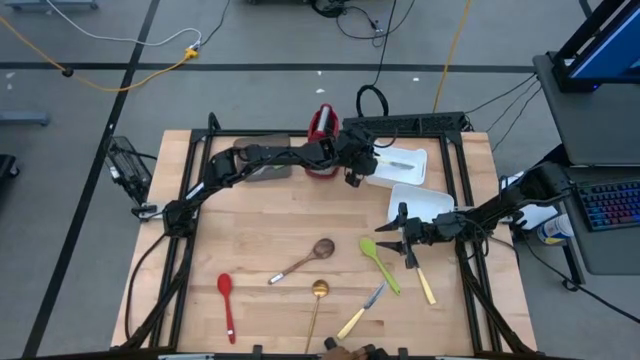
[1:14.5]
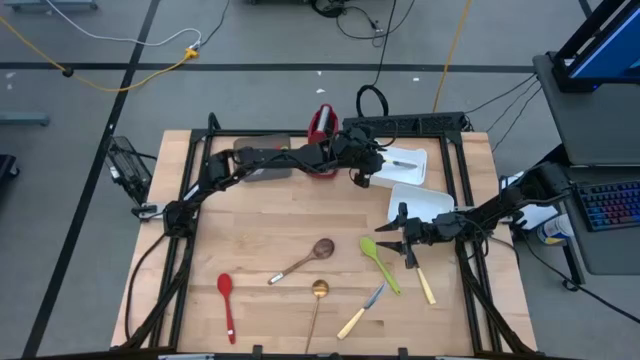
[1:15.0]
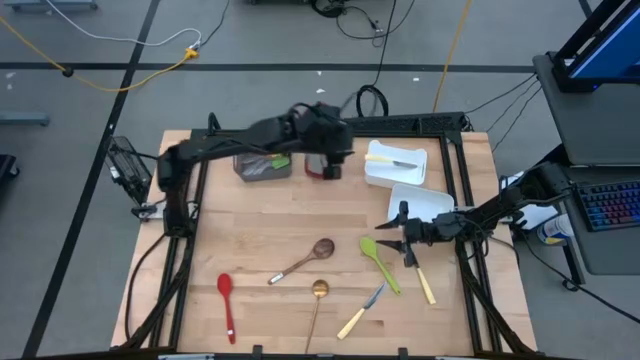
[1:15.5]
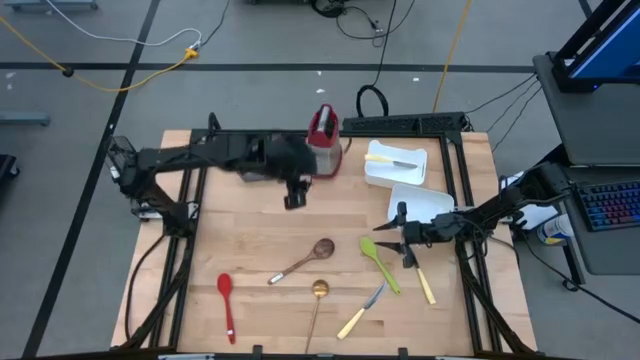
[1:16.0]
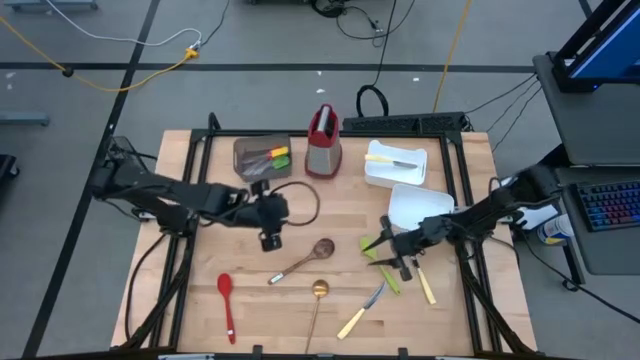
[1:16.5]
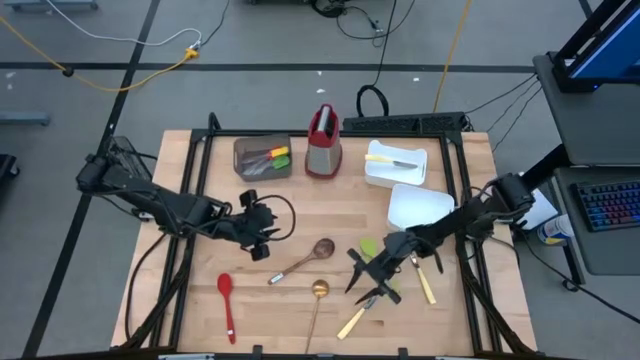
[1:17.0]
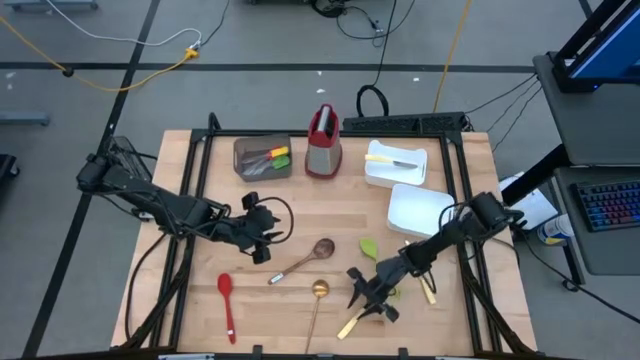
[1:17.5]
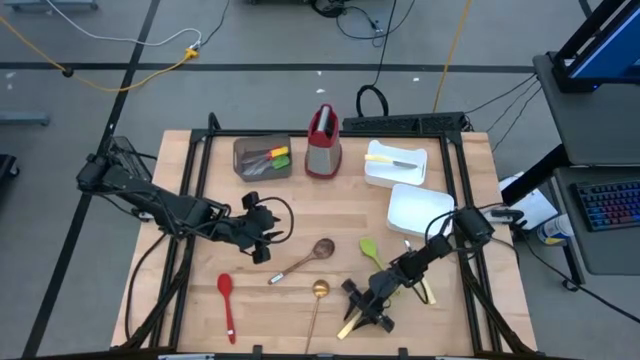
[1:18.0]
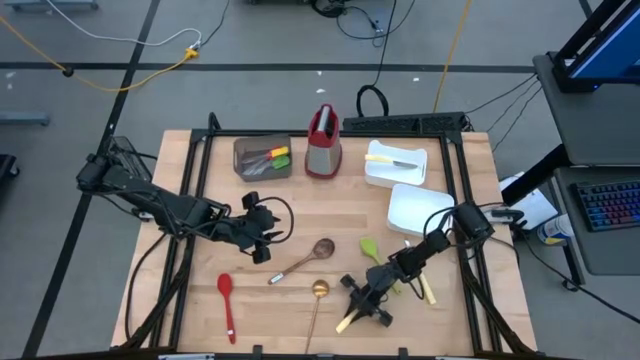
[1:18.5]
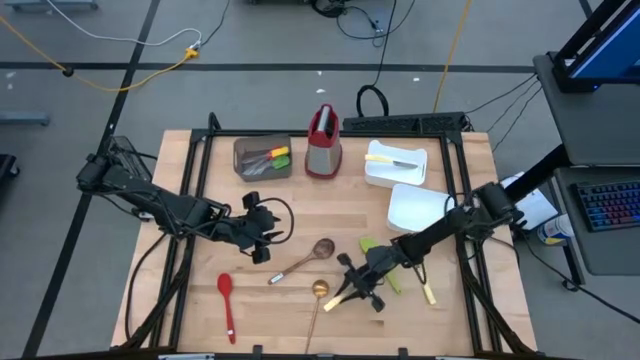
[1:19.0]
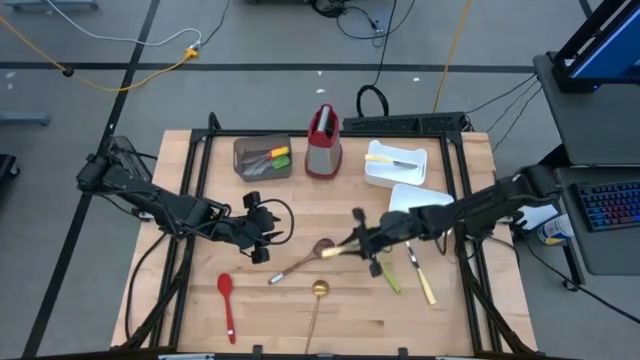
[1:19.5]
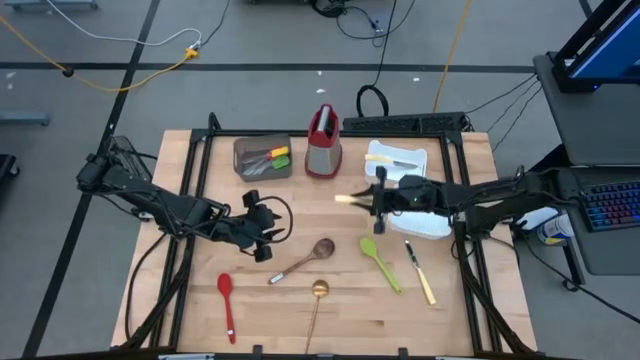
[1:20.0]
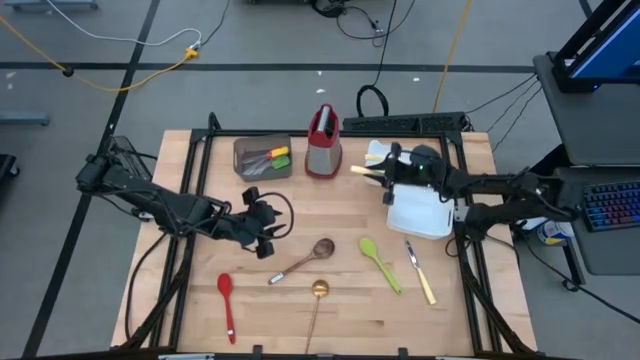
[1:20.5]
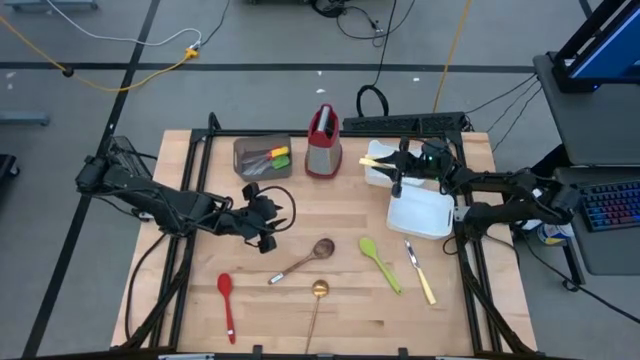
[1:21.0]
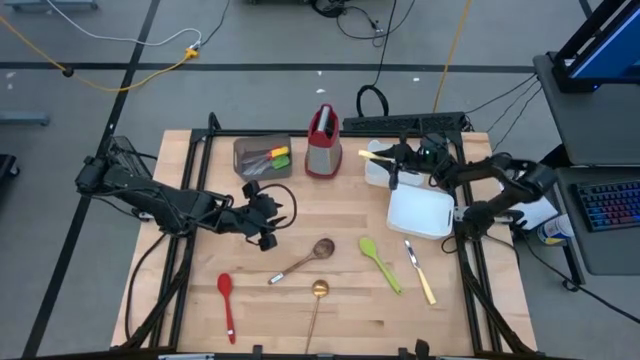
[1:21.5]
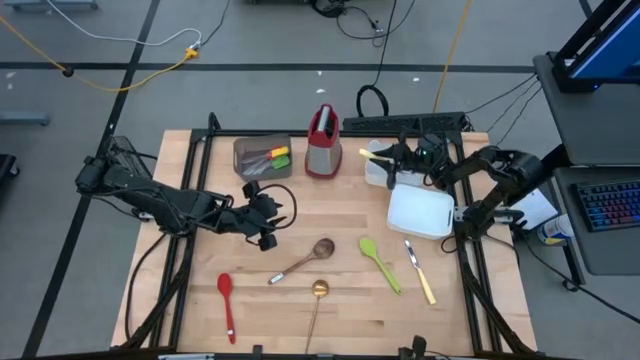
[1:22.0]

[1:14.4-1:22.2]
Task: Pick & Place Kitchen Items
Put the left yellow table knife into the top white bin

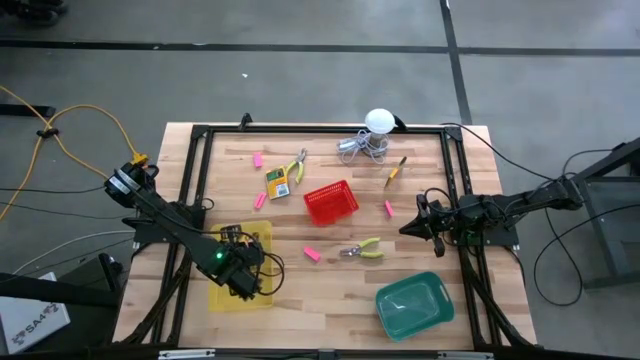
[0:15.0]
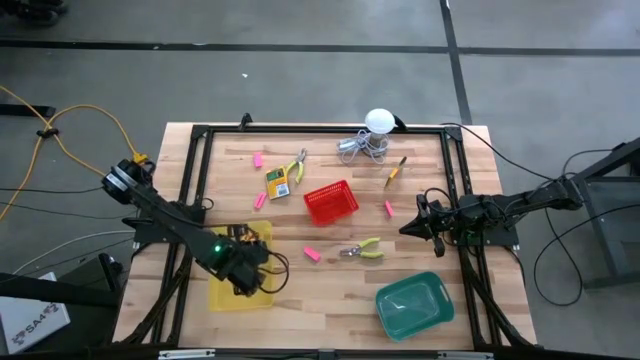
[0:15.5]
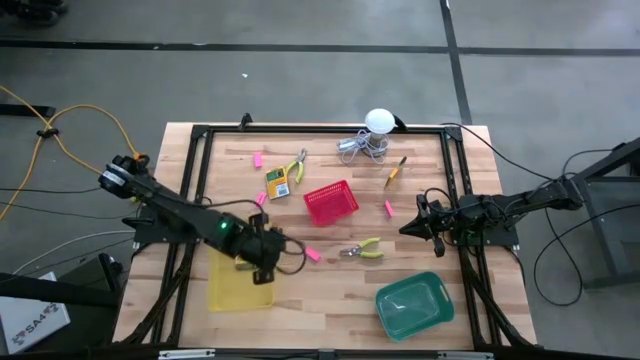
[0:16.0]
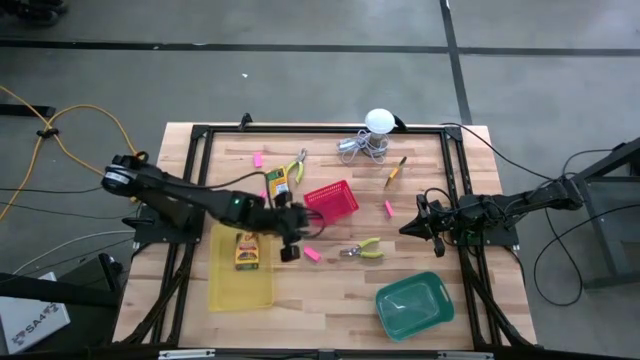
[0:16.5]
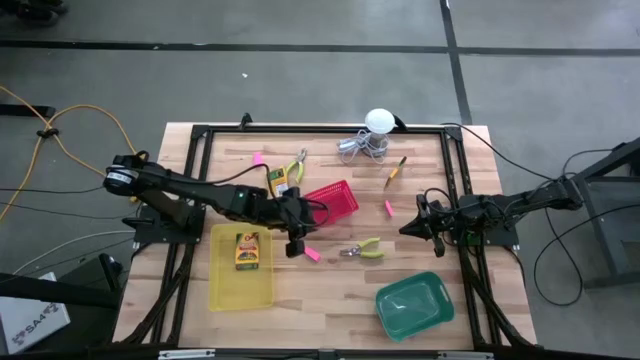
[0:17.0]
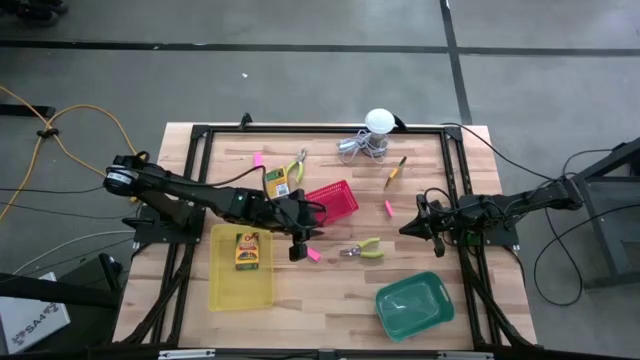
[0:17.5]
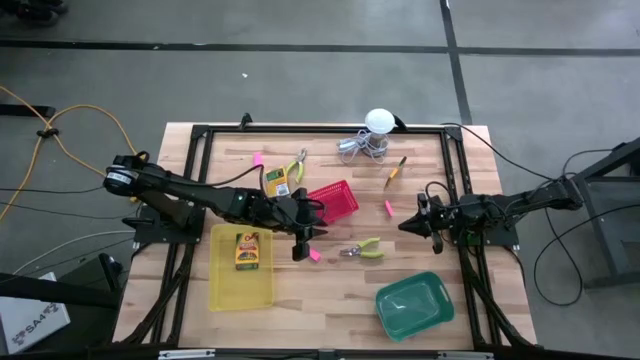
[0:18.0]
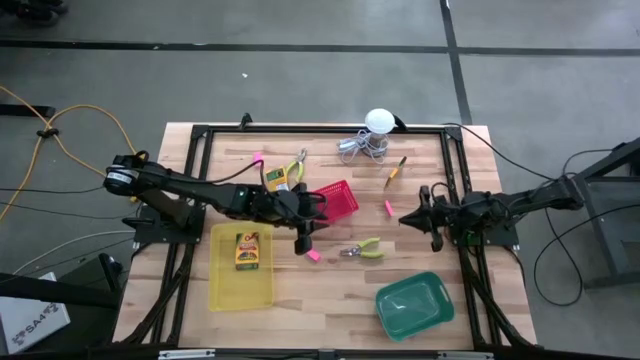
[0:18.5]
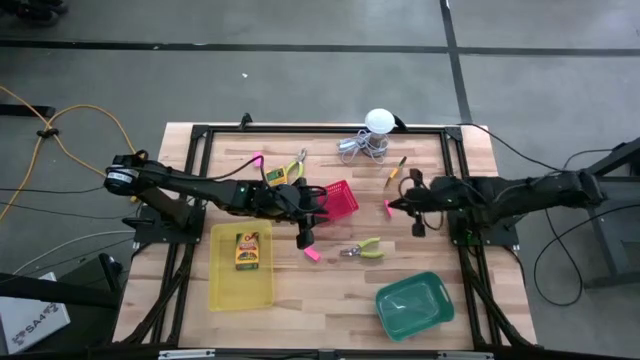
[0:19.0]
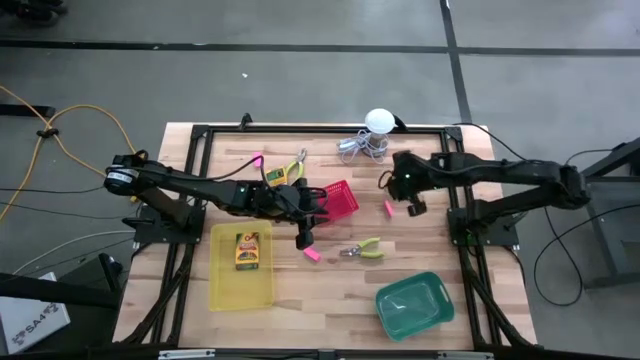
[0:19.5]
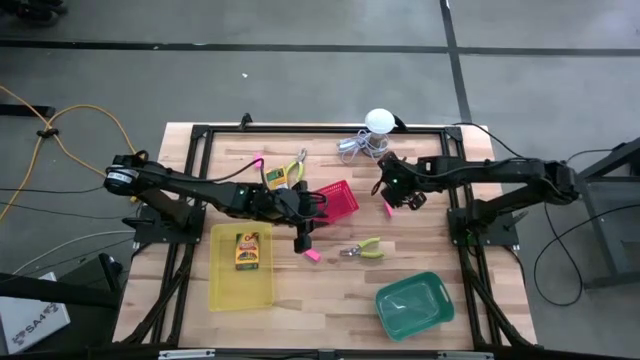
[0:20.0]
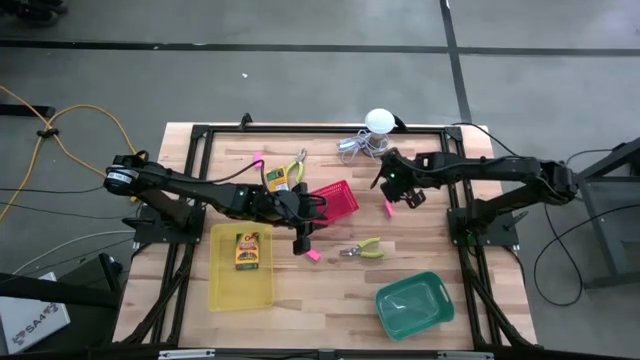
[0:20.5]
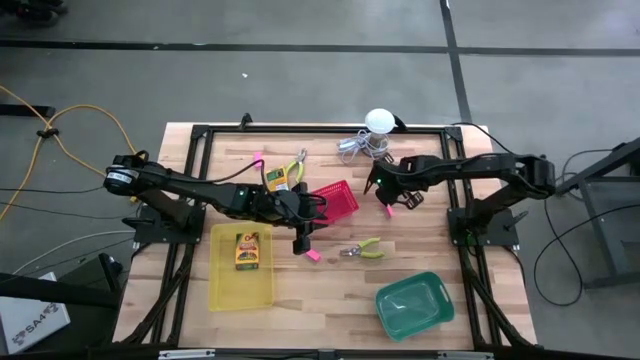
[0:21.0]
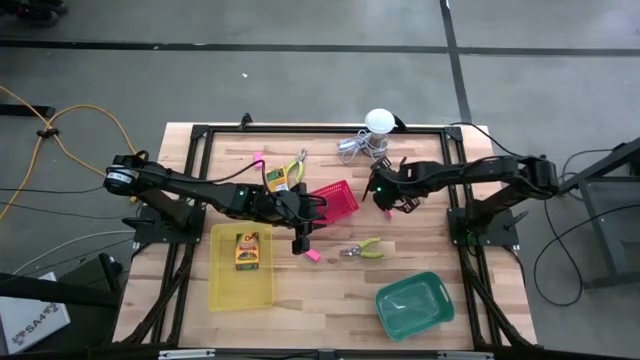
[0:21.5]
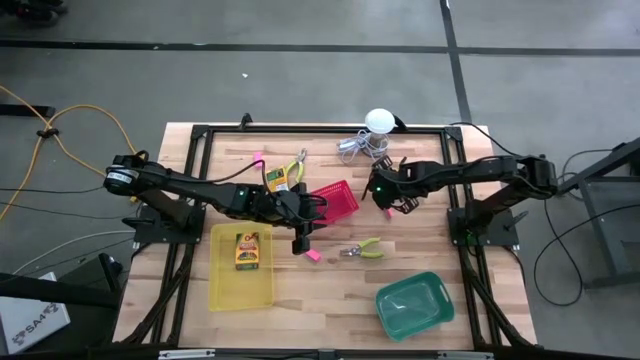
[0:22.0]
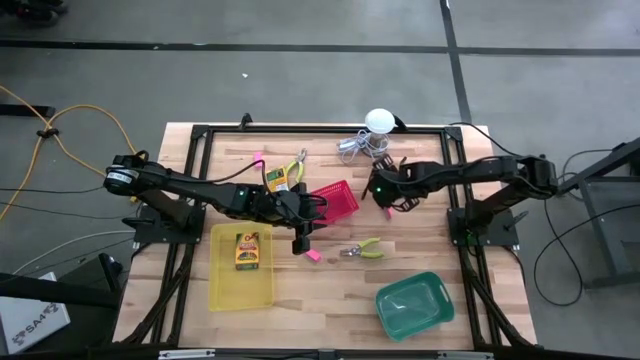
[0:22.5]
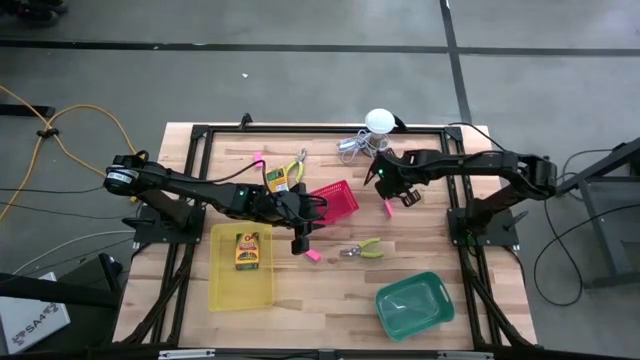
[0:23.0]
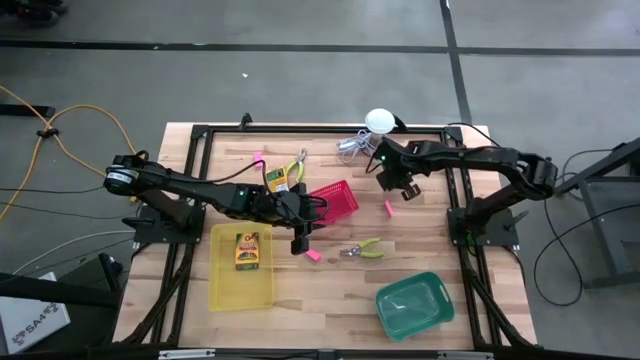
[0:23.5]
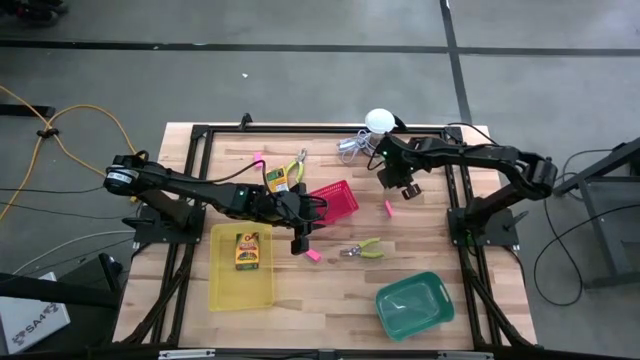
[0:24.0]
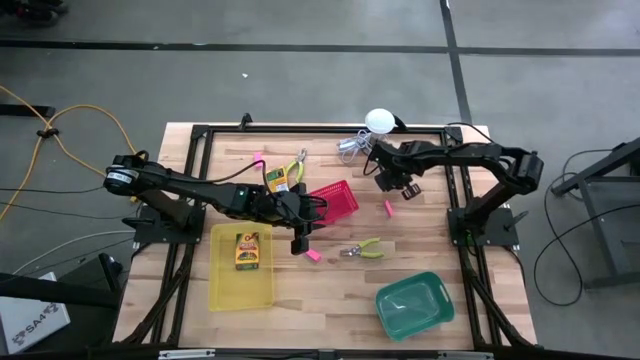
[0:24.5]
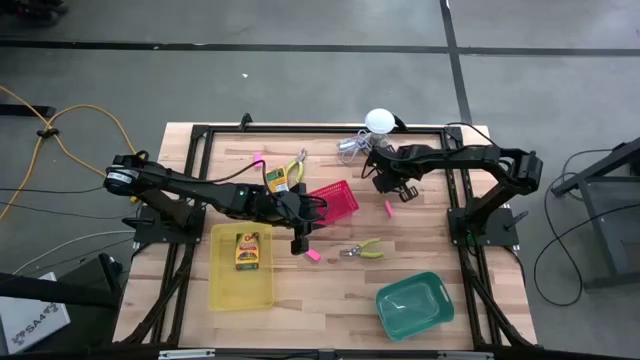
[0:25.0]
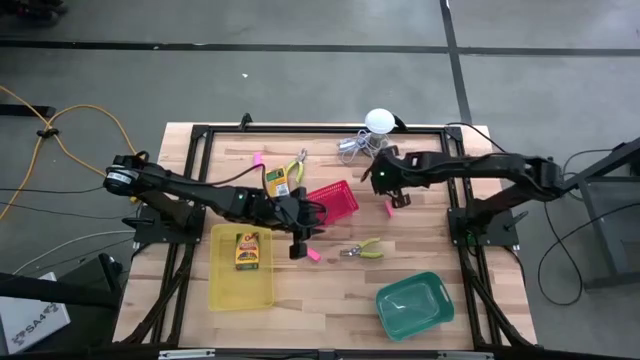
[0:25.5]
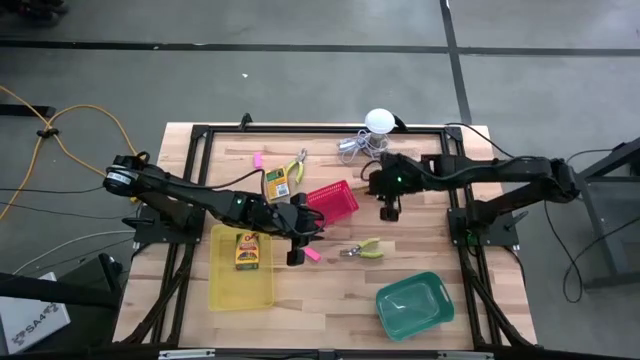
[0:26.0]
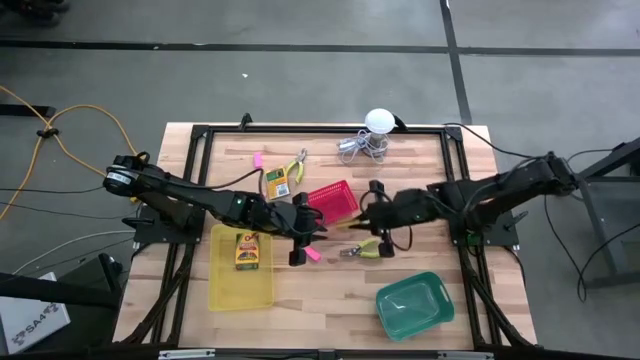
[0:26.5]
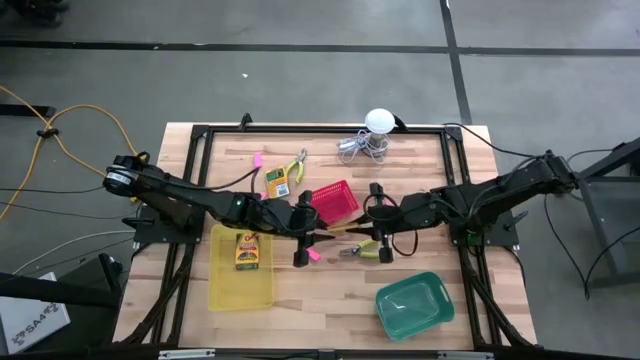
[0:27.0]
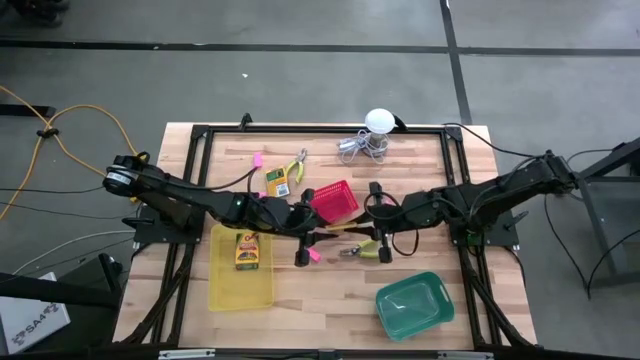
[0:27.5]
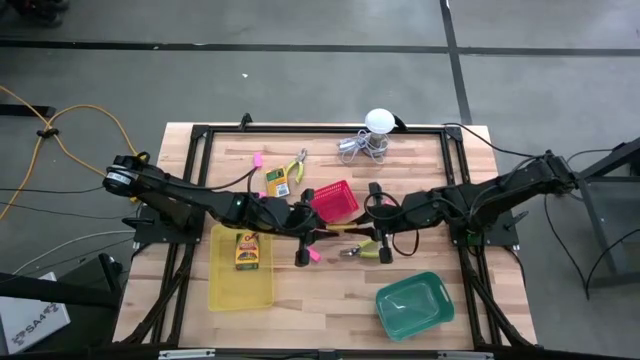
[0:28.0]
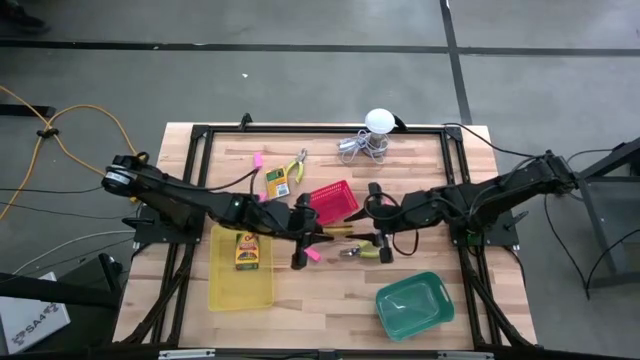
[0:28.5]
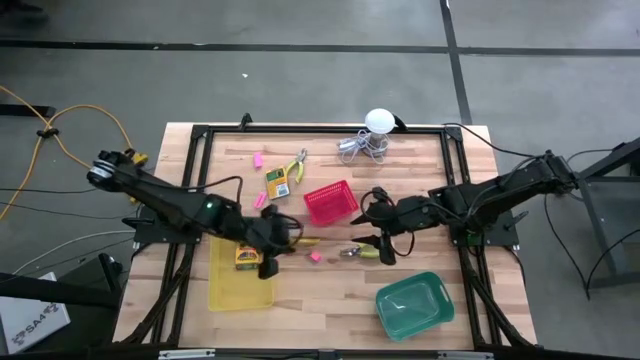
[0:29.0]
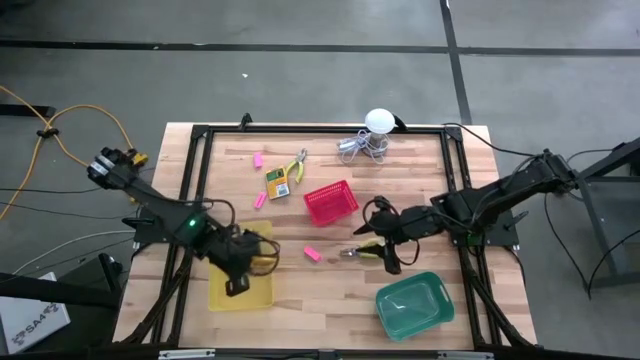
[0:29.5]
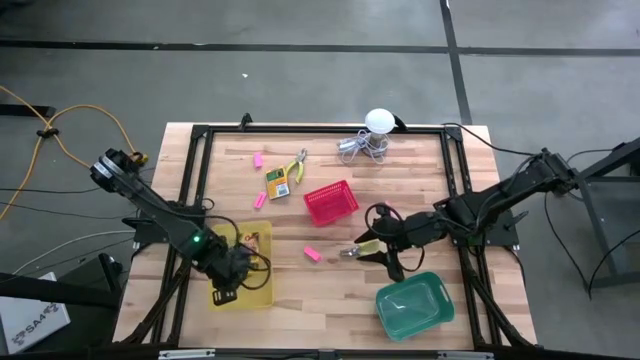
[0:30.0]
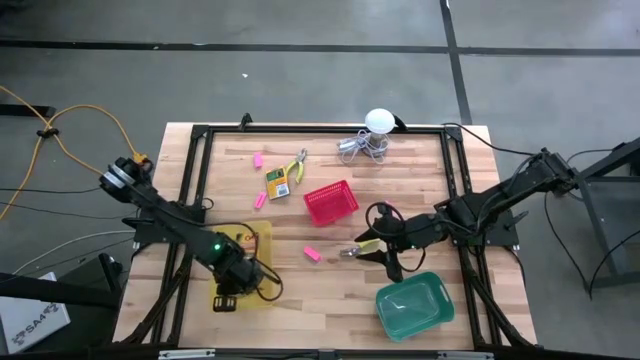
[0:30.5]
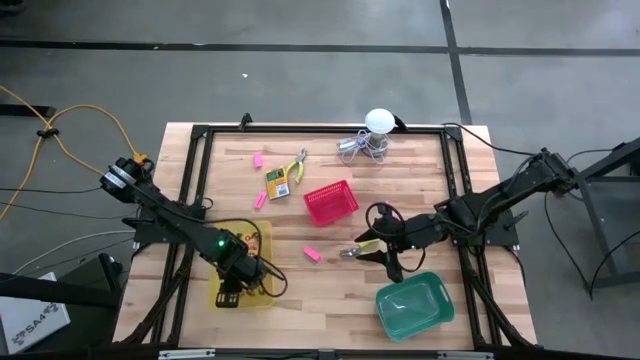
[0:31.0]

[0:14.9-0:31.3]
Task: Pick & Place School Supplies
Put the yellow box of crayons into the yellow bin
